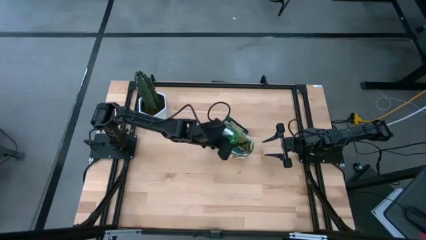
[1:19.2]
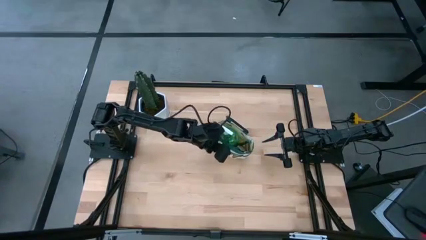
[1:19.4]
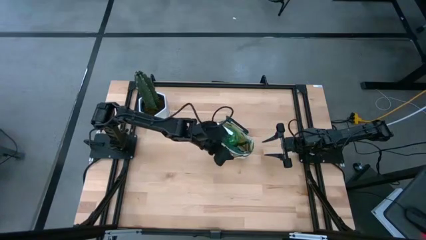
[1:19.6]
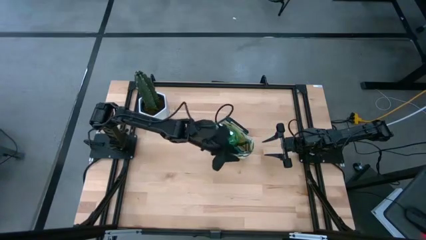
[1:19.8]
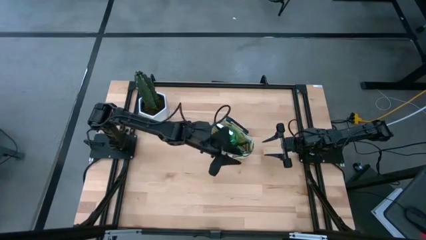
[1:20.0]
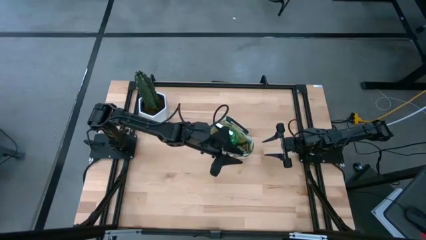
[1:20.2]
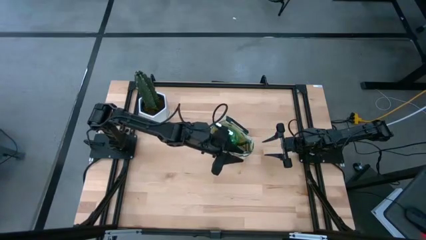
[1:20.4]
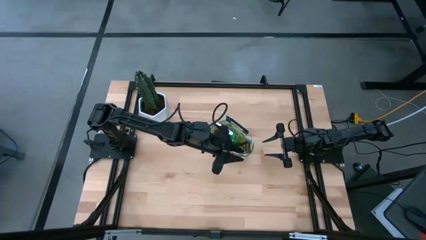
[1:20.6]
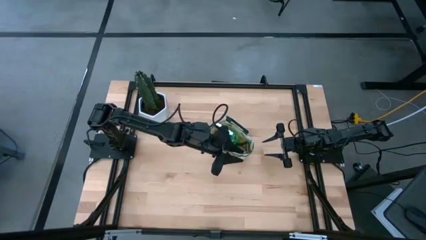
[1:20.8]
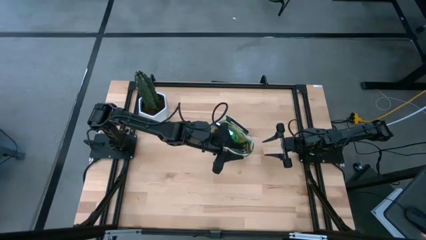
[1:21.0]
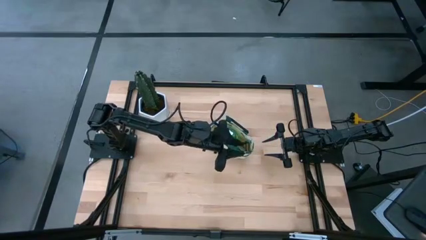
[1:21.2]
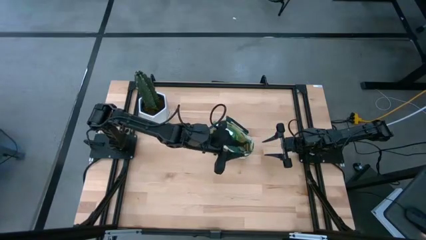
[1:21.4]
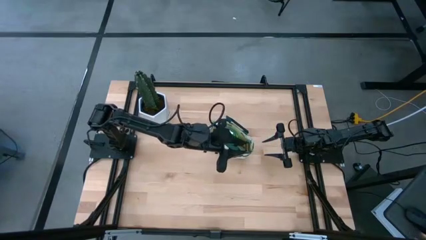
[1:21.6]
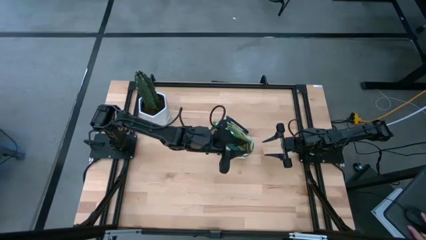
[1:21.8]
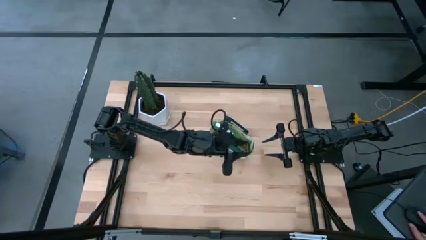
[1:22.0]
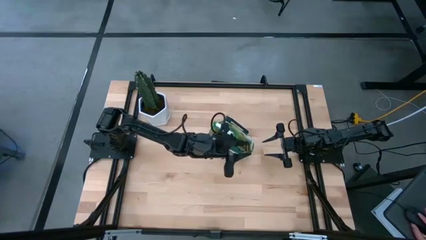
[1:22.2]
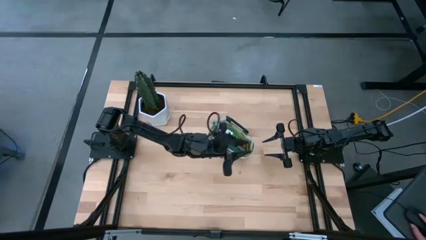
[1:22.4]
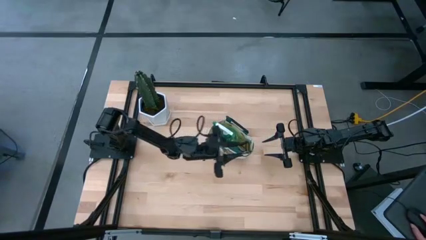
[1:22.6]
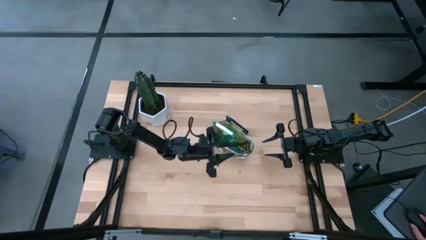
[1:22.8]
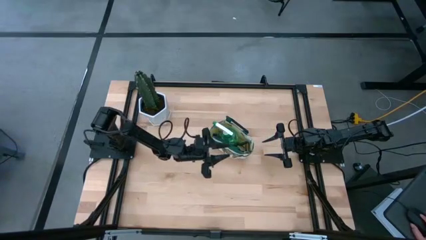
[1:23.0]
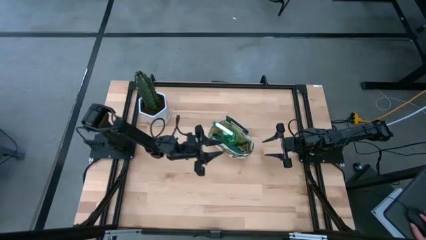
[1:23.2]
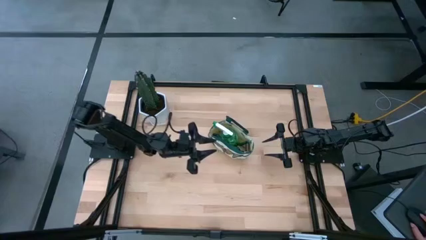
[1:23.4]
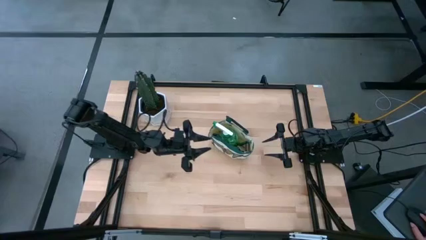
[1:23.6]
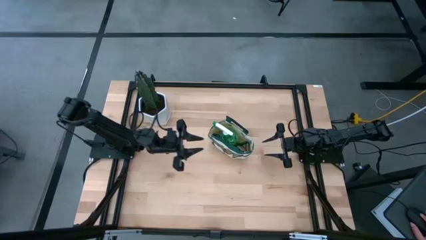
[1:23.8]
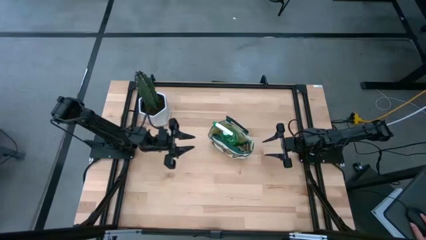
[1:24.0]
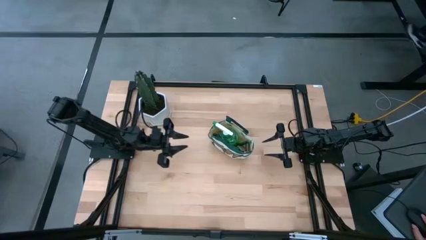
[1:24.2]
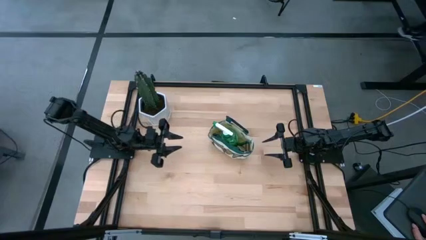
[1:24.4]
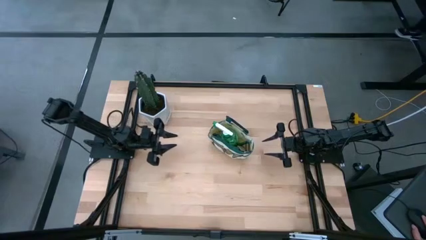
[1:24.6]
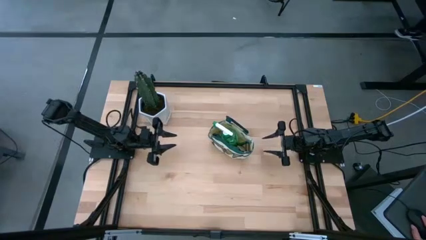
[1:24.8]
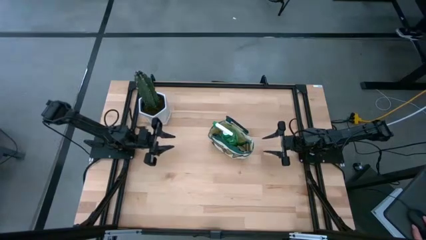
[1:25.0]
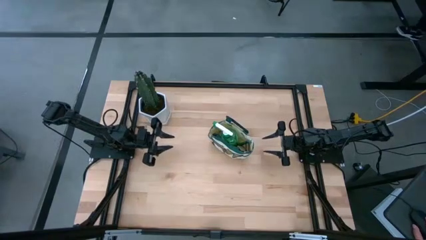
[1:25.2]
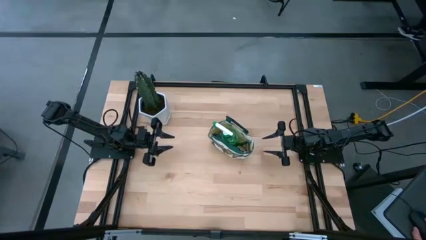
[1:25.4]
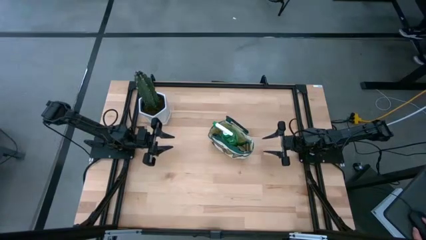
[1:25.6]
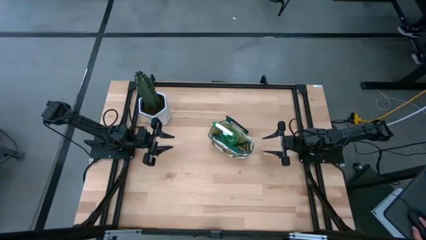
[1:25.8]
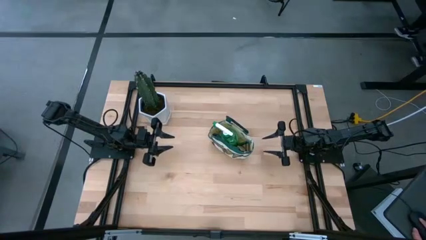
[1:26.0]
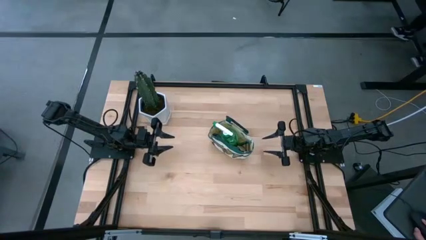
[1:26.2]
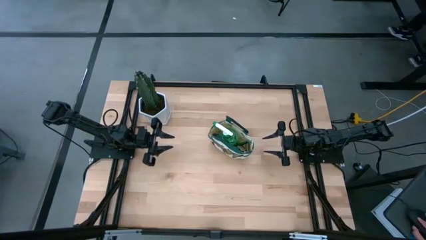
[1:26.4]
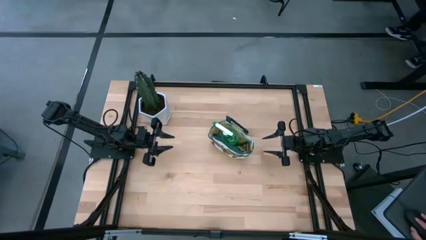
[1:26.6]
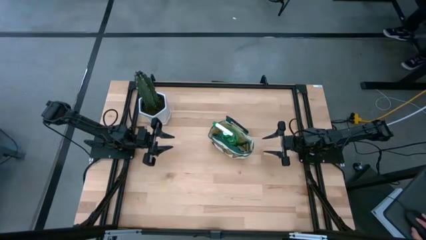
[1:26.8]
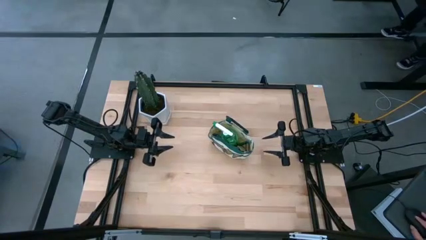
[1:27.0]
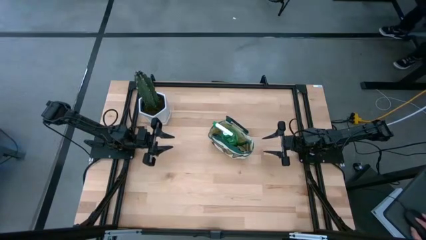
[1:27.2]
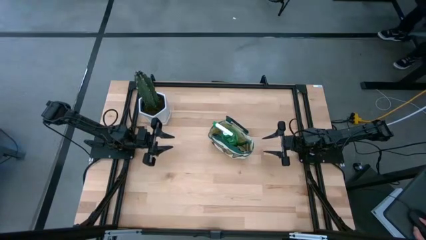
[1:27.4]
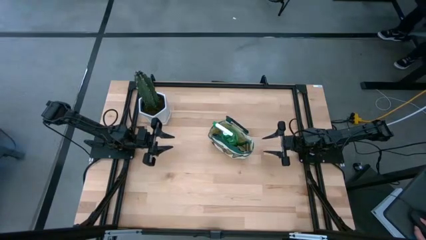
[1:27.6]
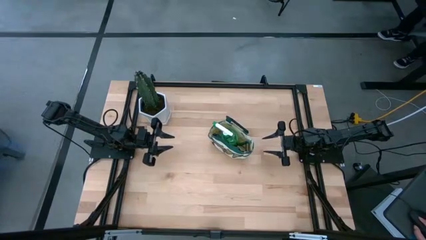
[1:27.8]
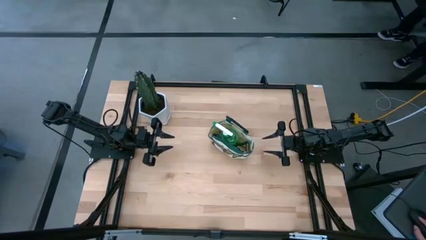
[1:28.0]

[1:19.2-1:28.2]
Task: Pick & Place Garden tools in Gardening bag
Return to Home Position

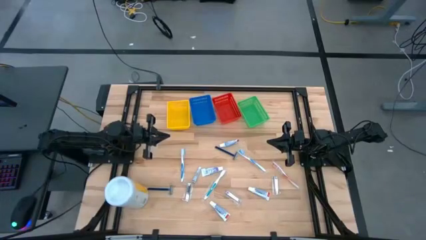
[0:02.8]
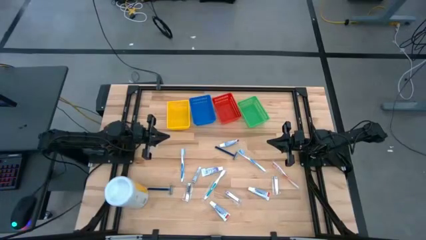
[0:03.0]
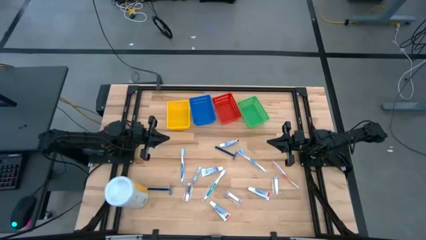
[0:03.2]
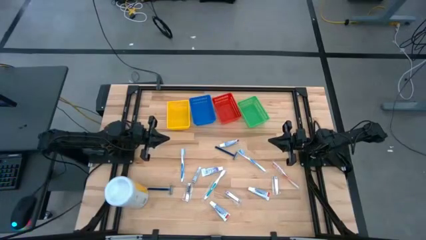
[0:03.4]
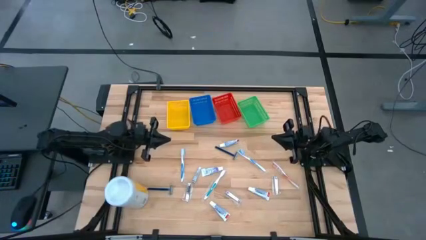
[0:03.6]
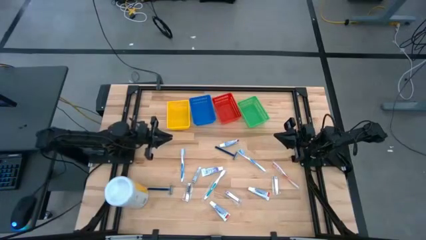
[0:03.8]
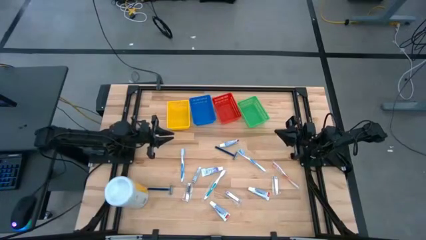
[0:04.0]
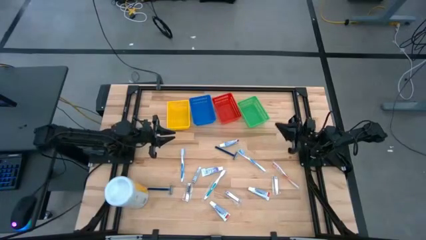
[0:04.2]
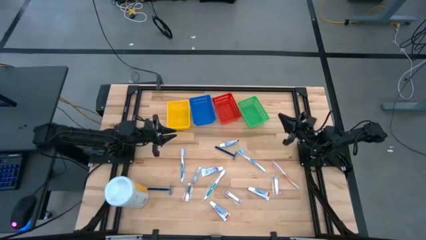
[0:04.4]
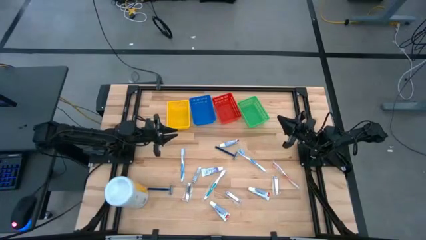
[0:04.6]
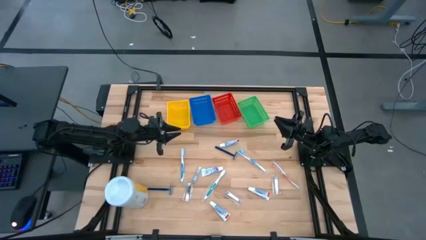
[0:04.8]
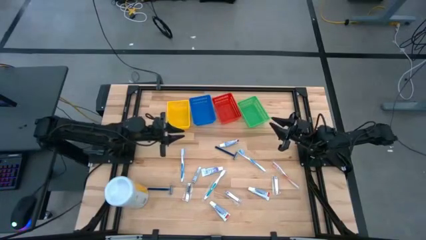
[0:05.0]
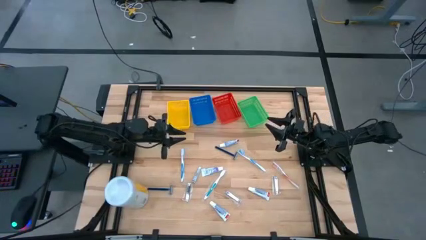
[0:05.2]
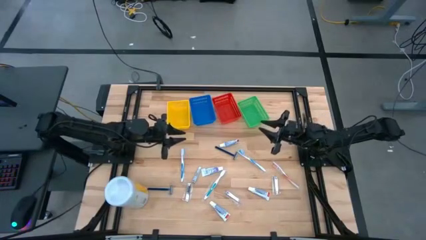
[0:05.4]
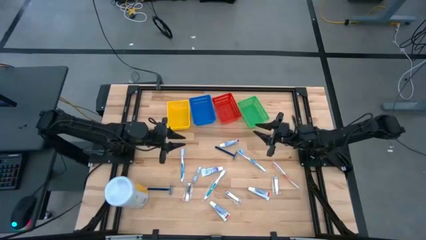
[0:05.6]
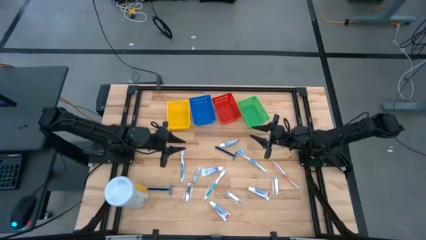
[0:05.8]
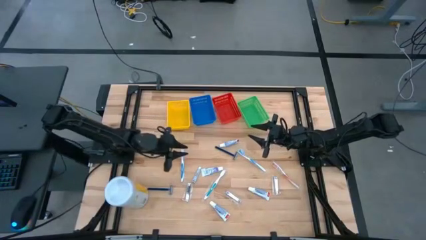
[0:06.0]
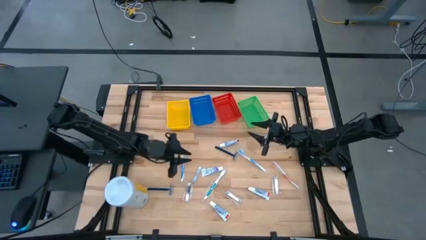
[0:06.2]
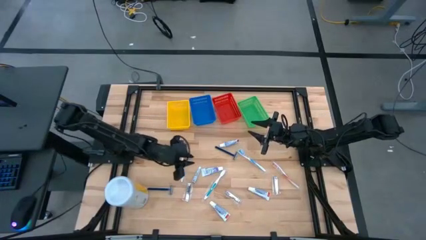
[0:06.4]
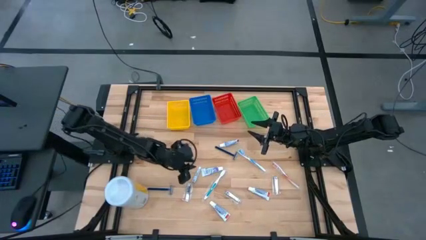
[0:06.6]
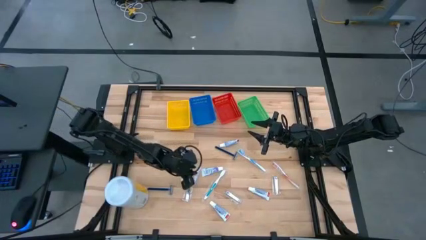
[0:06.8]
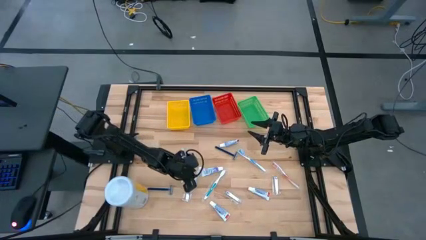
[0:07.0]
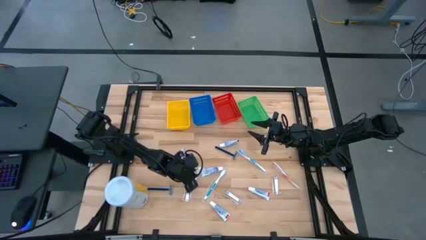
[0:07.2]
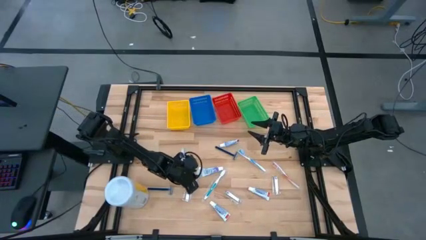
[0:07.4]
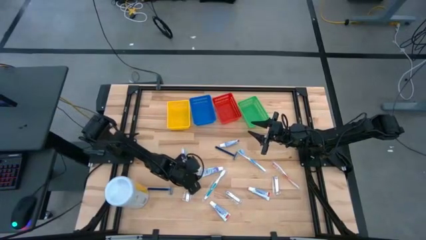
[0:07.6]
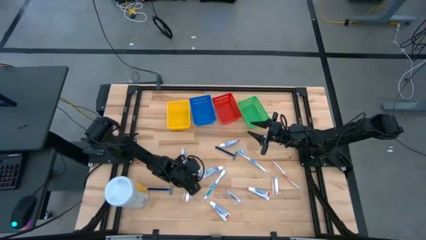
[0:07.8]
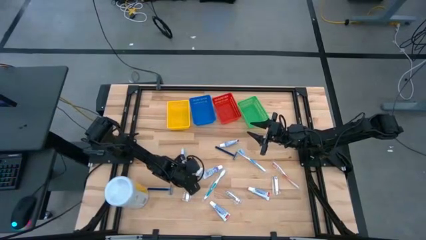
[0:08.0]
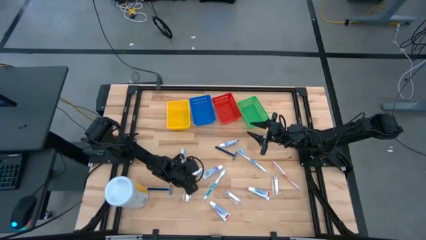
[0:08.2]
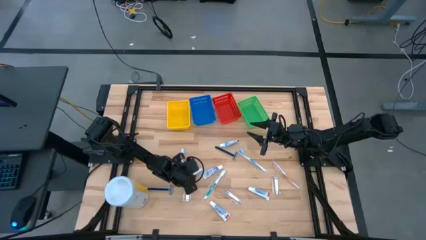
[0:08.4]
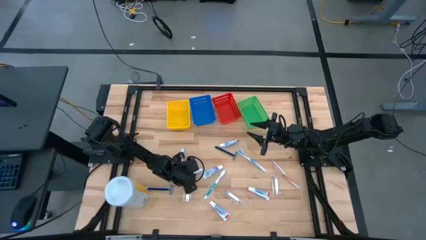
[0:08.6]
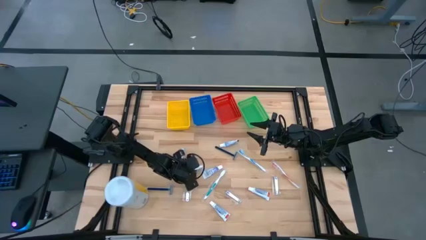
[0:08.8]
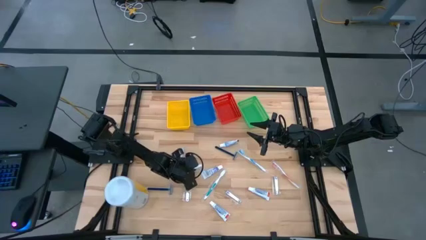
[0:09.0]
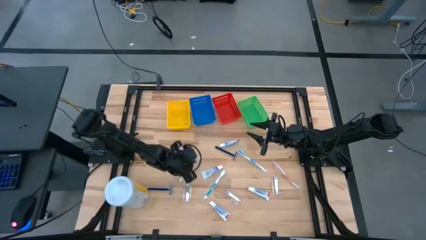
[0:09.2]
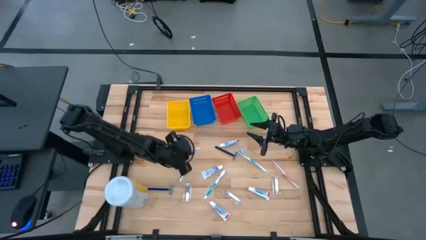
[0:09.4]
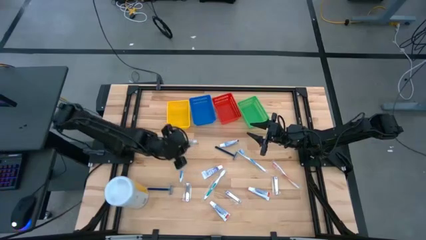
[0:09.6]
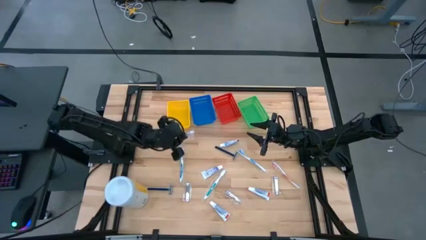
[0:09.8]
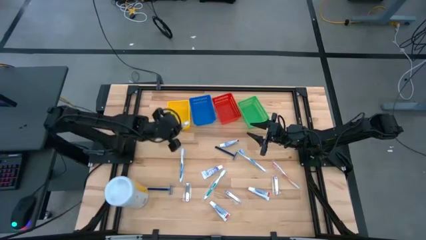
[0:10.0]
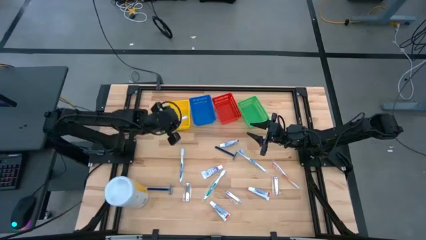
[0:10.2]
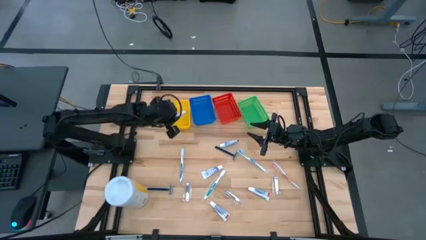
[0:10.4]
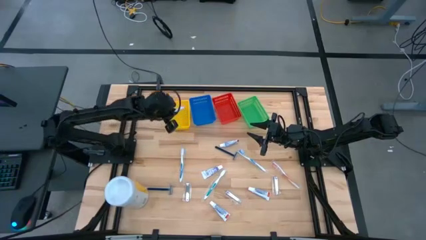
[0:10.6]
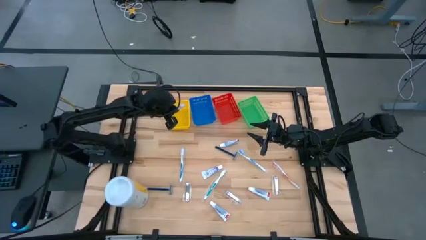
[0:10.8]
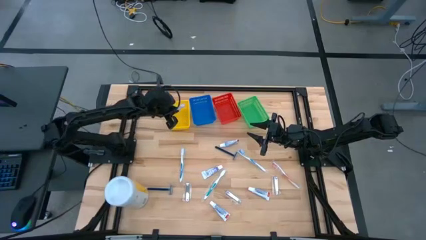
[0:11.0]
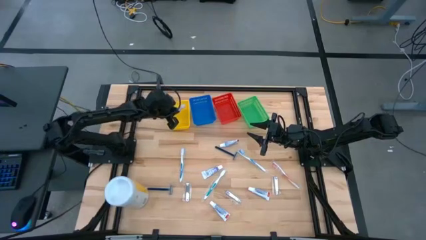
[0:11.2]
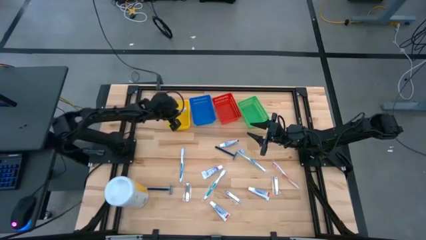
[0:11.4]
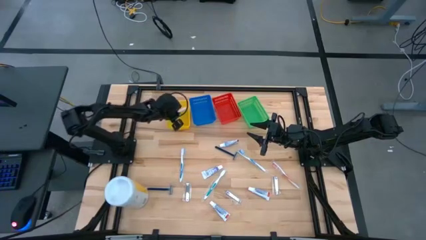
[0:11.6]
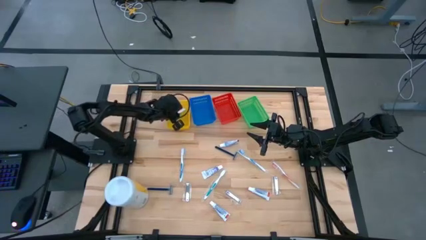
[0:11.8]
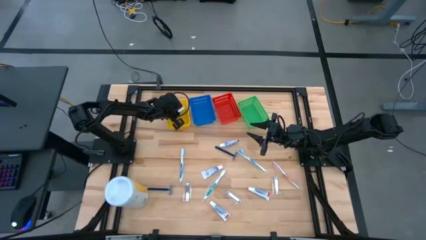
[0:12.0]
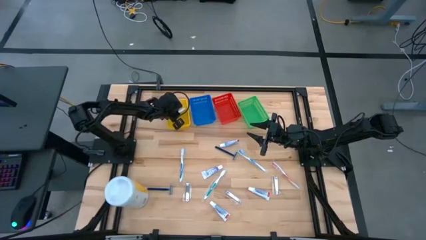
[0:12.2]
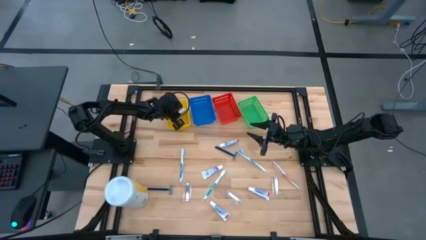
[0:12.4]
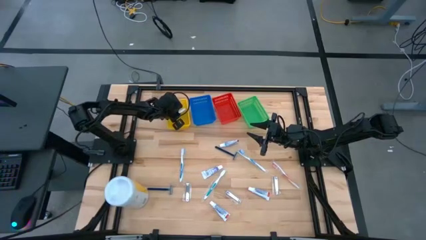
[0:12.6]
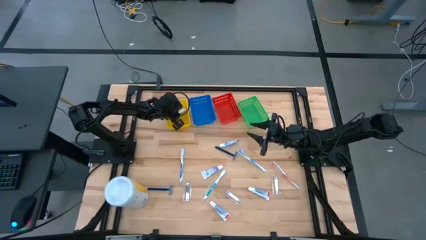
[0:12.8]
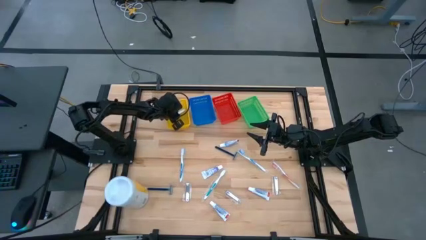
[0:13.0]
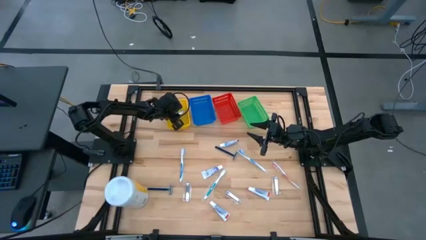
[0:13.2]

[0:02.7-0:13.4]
Task: Pick & Place Travel size toiletries
Put the top left nail cutter into the yellow bin
